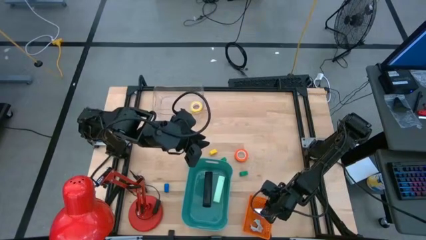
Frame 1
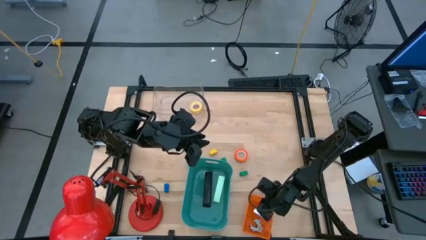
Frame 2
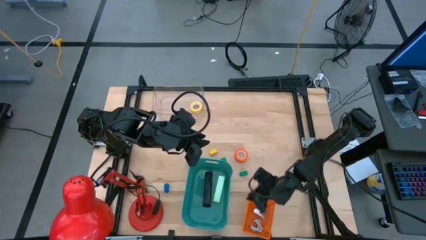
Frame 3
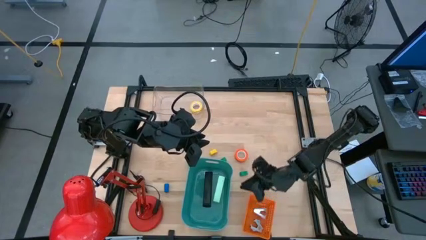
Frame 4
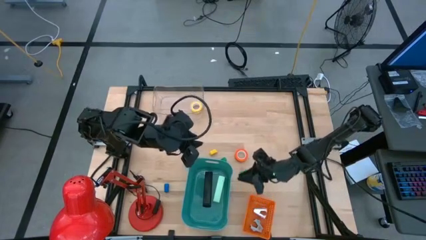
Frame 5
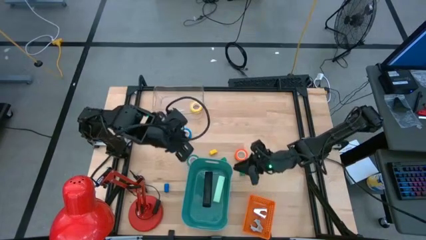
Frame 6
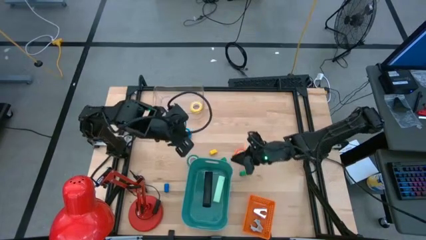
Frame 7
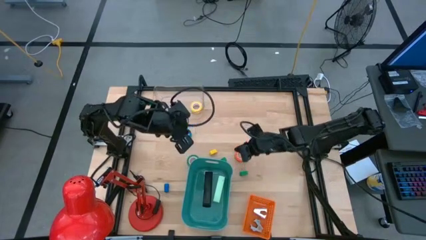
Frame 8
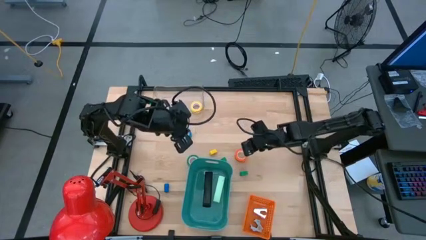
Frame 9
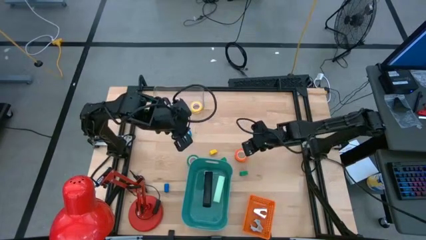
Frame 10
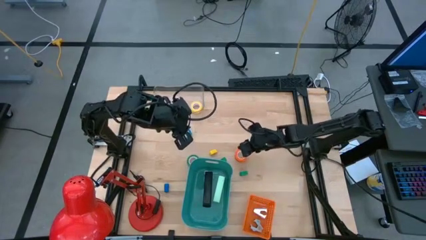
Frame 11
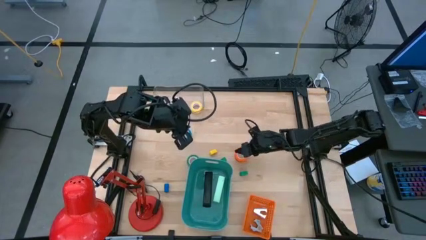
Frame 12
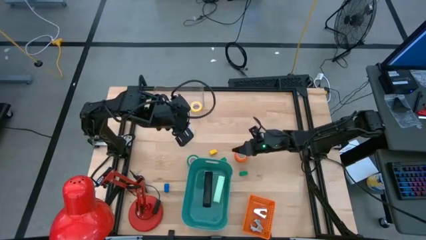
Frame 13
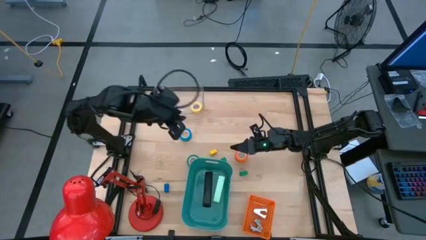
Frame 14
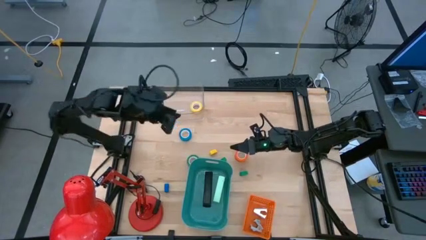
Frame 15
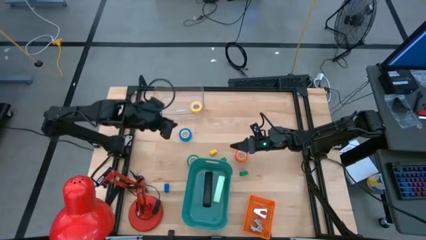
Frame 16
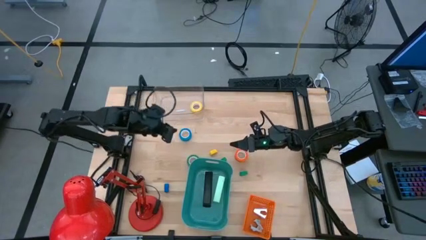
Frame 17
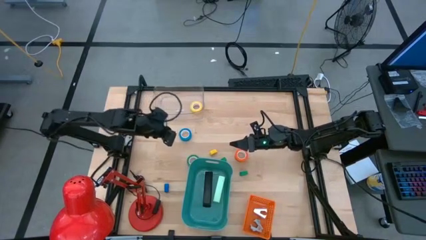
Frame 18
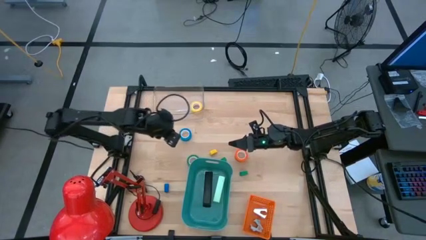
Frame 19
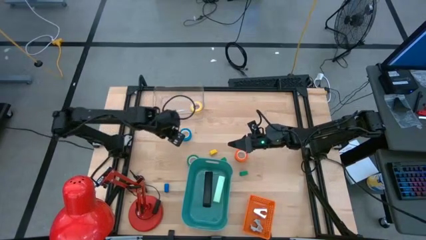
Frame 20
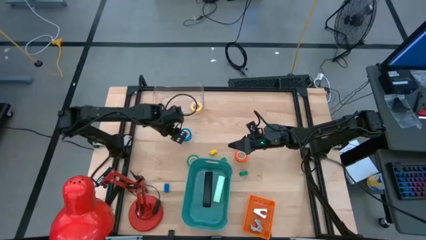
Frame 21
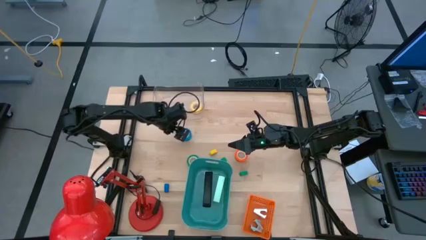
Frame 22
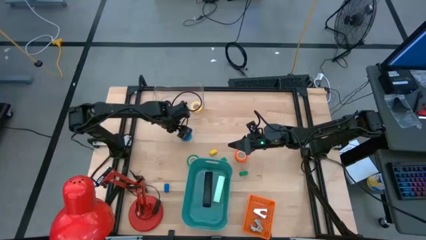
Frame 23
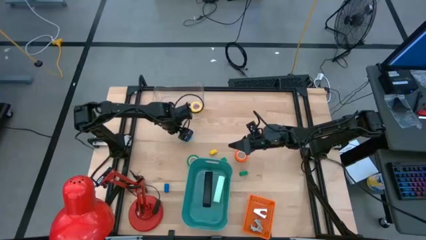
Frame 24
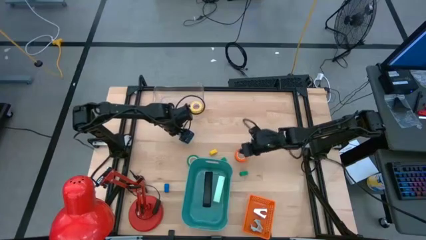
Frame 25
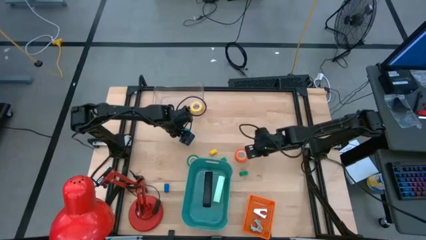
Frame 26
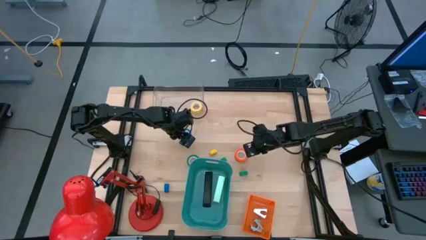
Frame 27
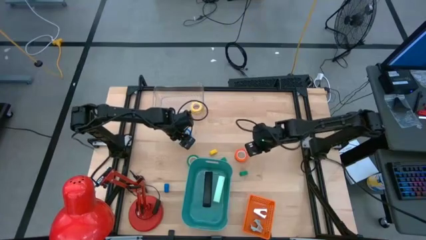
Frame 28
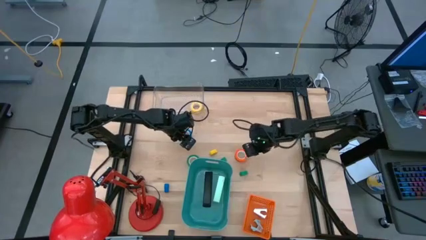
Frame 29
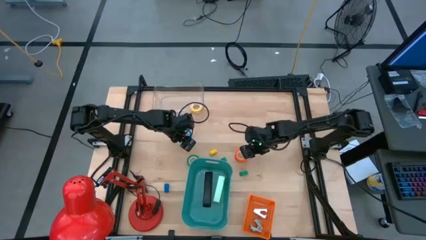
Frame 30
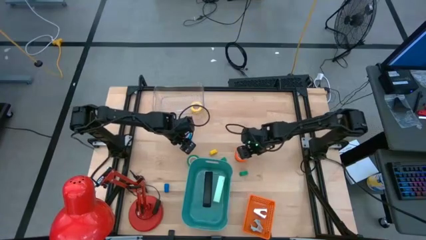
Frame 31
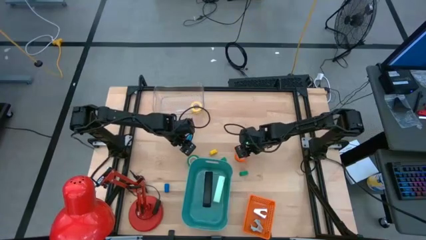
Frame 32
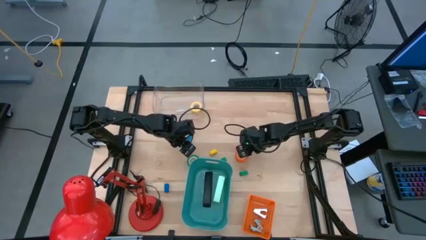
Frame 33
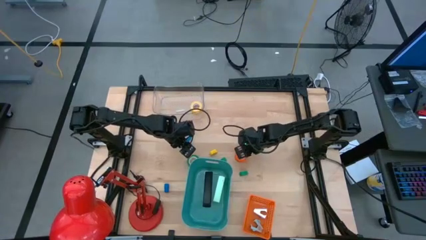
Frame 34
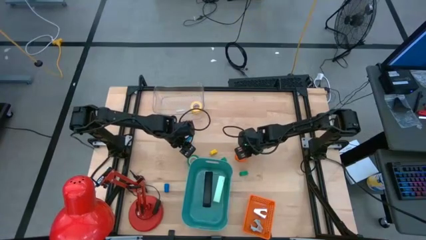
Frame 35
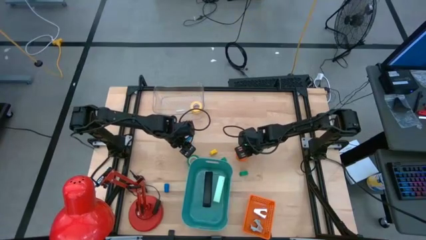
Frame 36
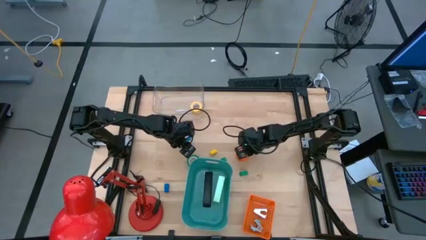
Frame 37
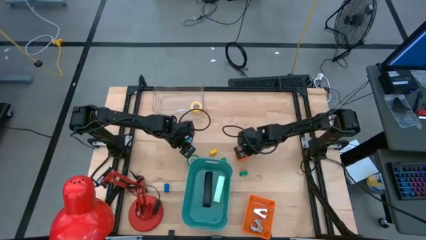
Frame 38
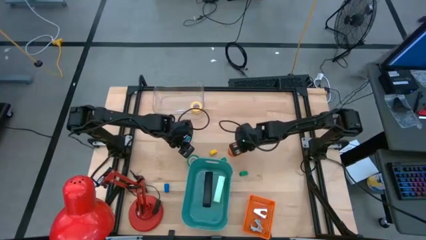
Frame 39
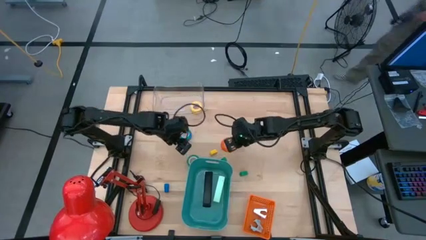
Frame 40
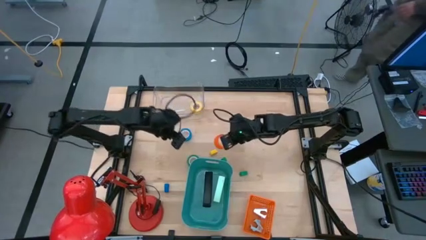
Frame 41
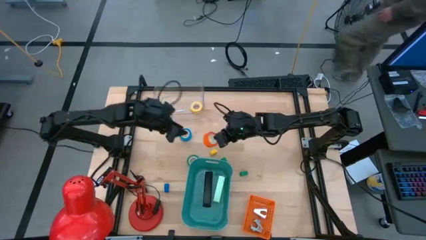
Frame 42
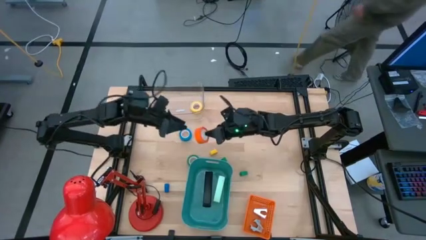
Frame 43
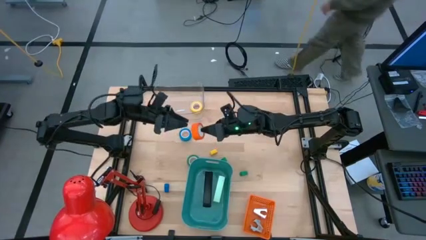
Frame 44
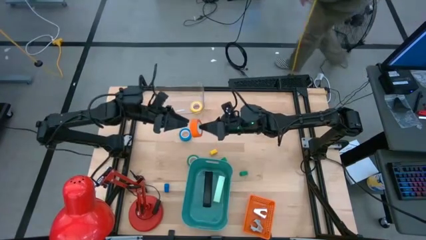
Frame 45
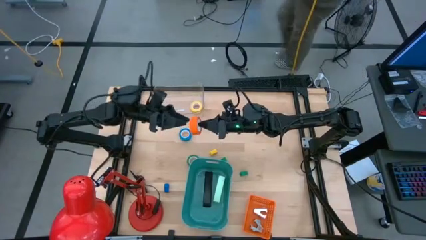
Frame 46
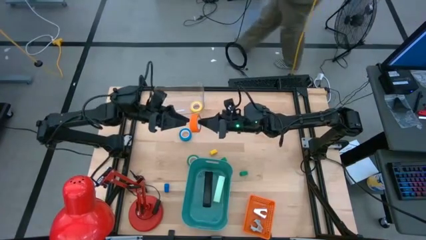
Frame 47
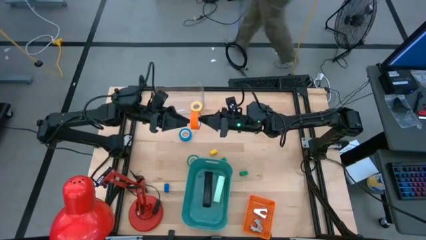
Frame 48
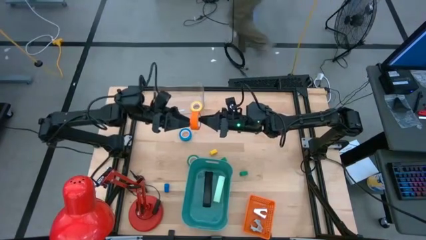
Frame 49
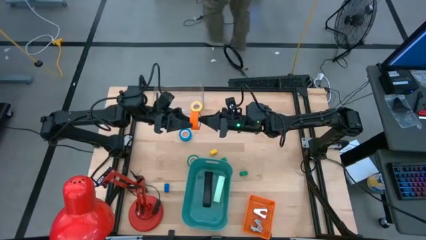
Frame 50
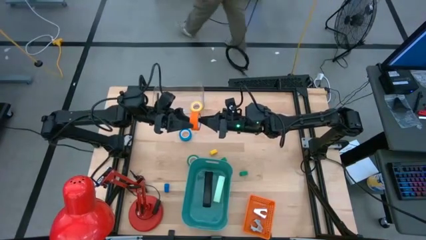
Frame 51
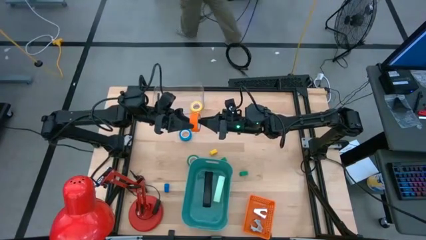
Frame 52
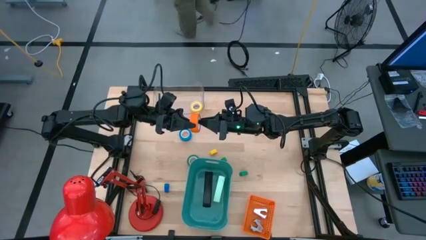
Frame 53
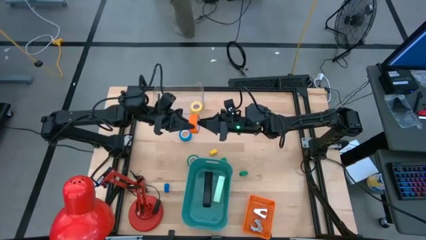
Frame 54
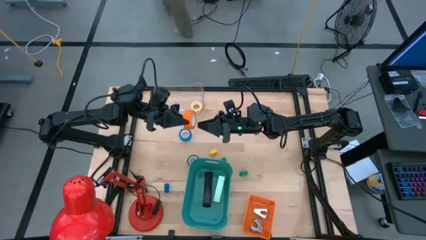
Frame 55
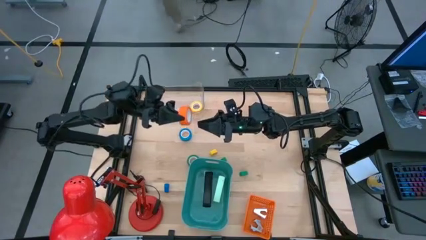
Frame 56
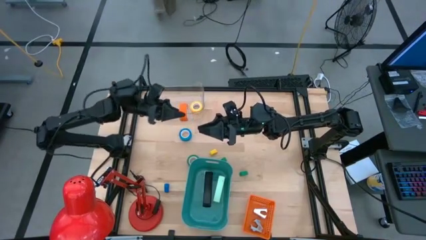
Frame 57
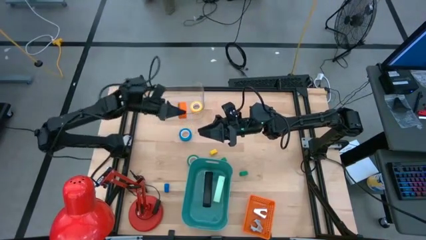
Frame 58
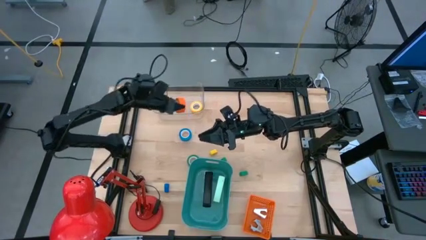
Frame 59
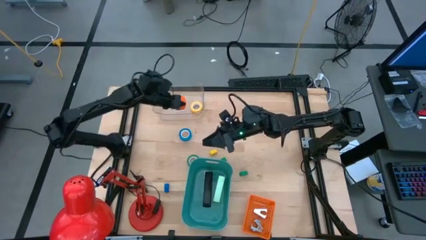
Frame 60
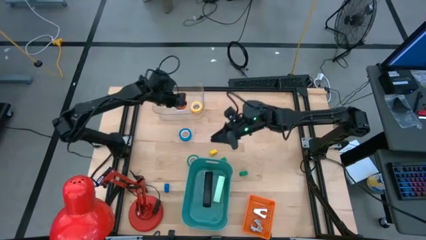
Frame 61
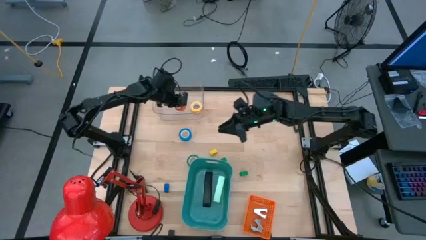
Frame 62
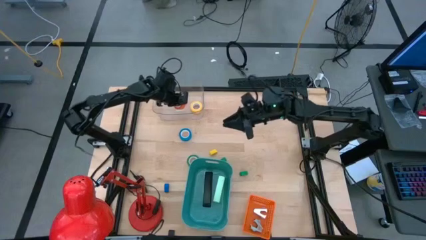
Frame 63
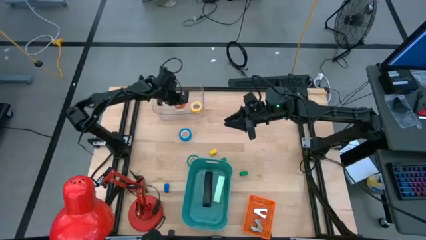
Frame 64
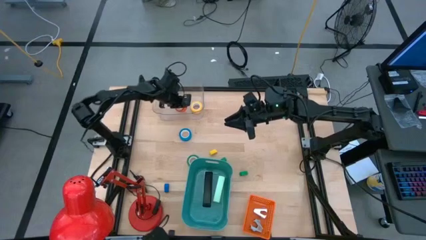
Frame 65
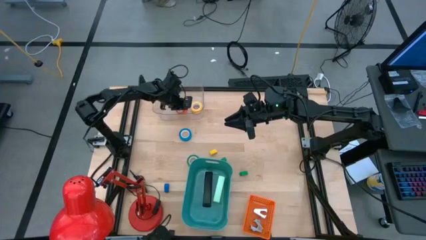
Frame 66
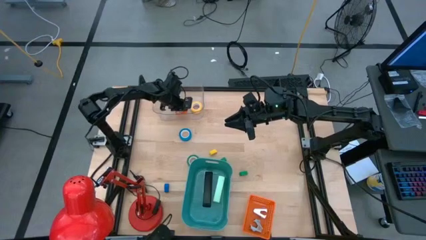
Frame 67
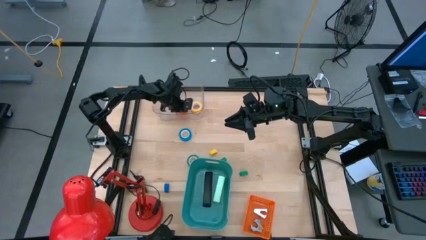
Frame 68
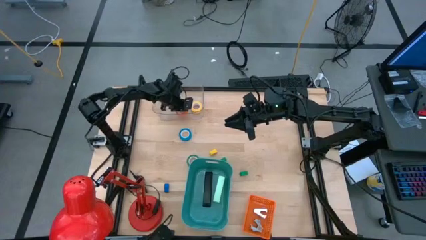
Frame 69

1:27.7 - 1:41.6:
Task: Pick and place Stapler, Stapler remover, tape
Put the orange tape into the transparent bin
